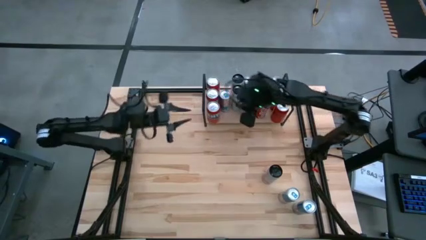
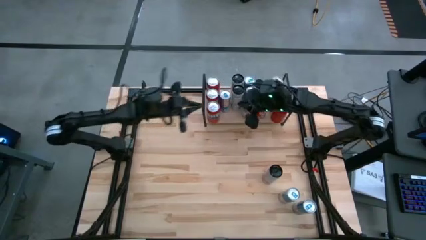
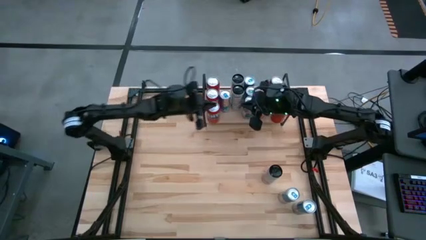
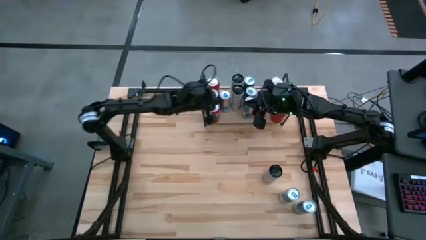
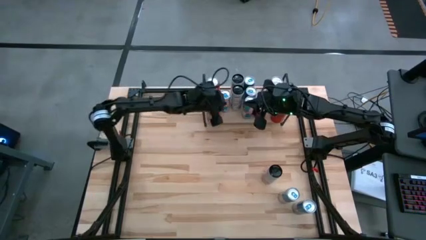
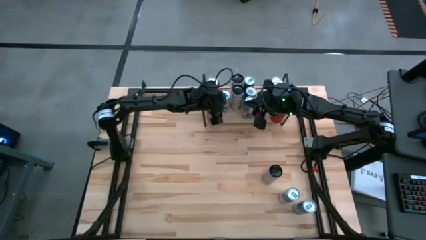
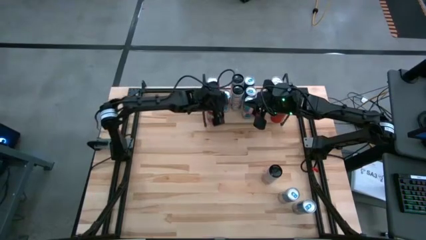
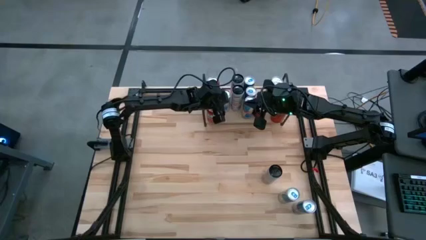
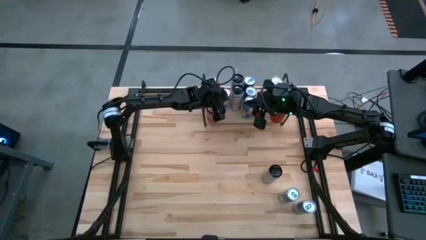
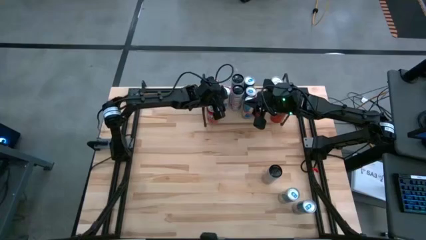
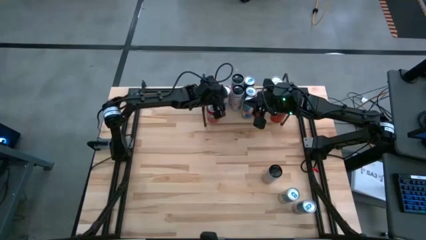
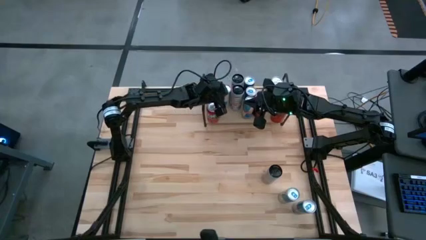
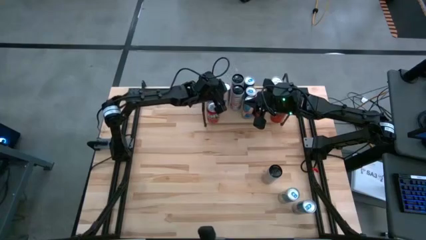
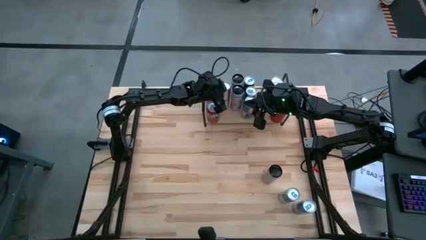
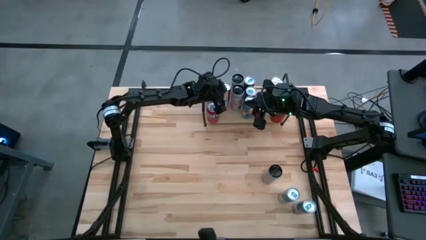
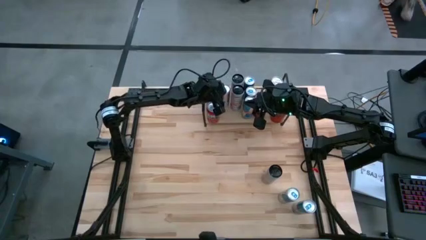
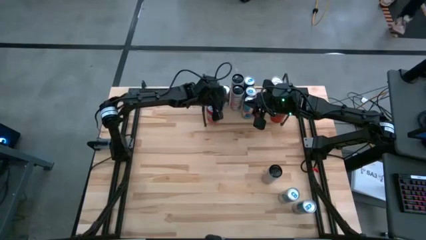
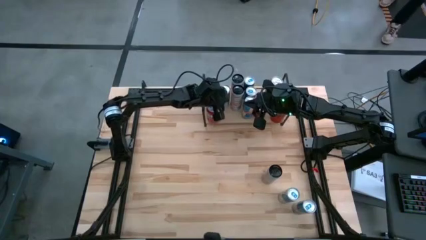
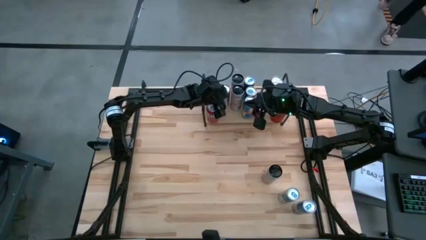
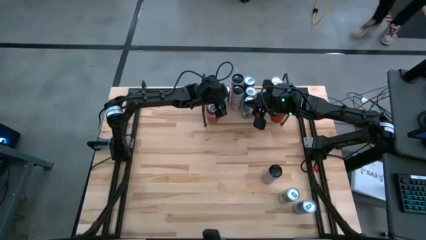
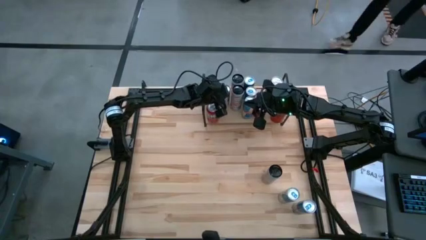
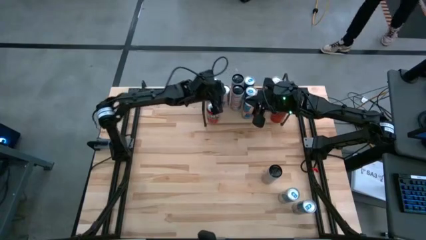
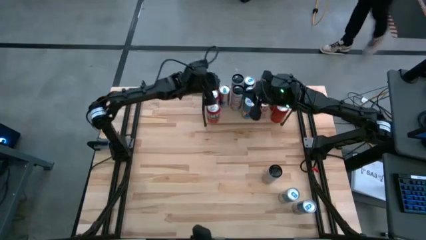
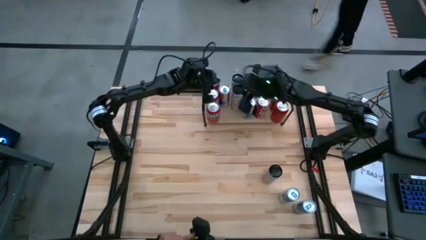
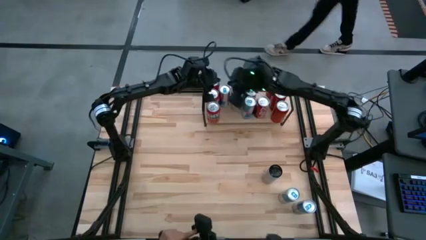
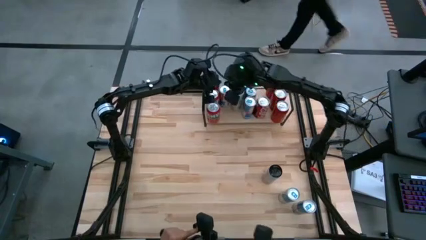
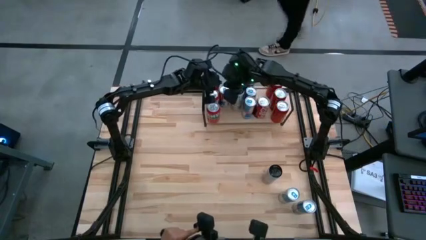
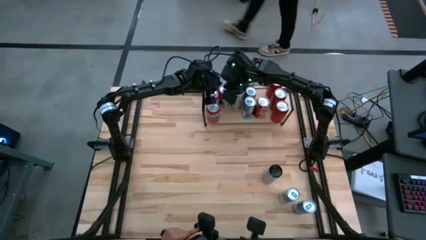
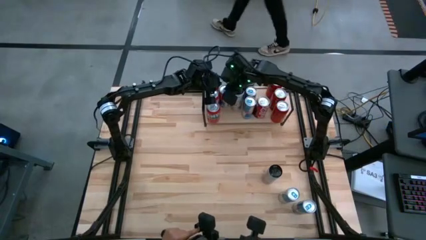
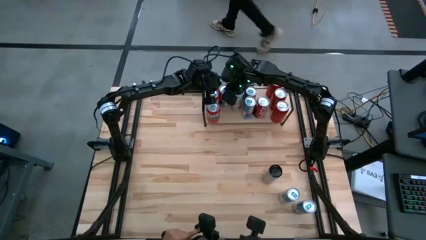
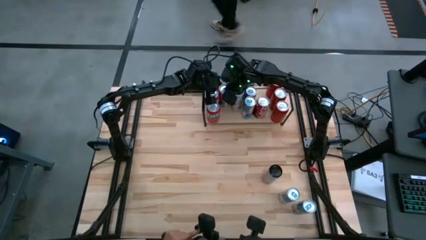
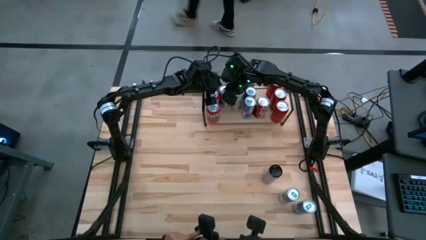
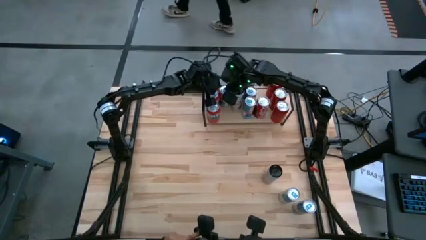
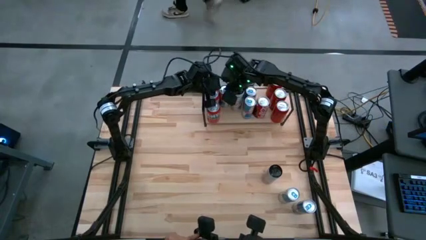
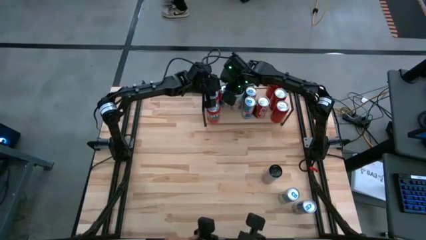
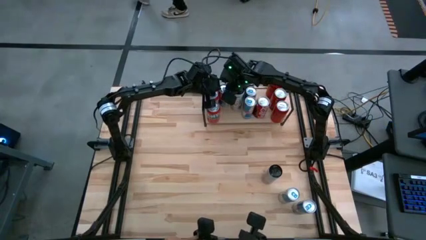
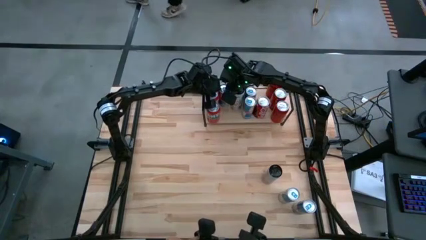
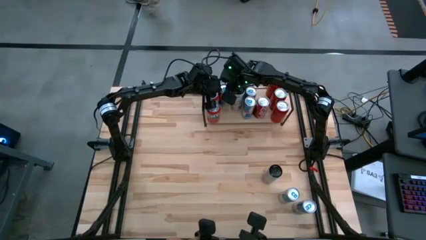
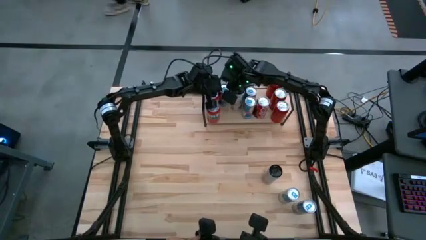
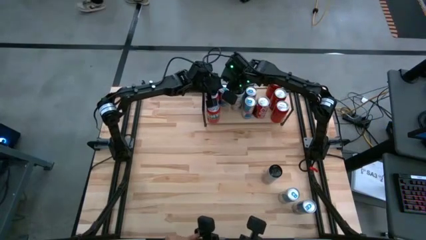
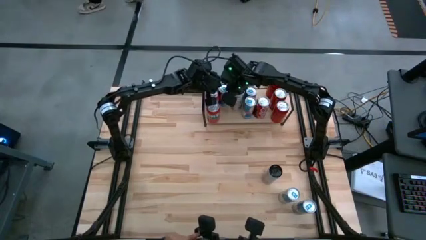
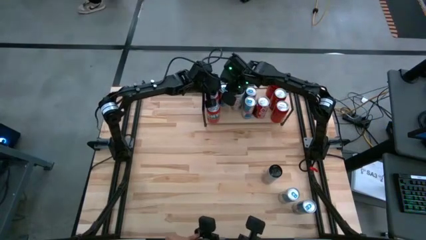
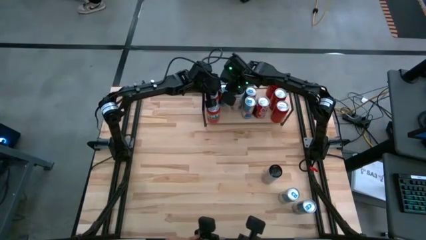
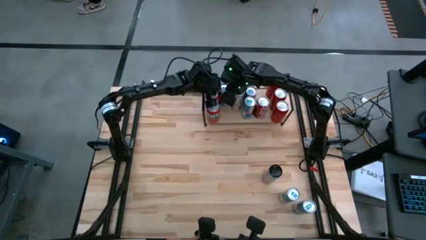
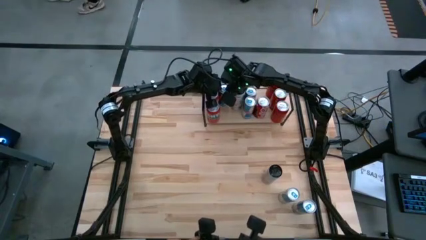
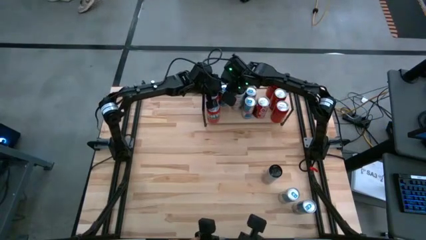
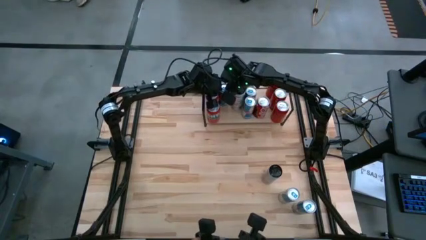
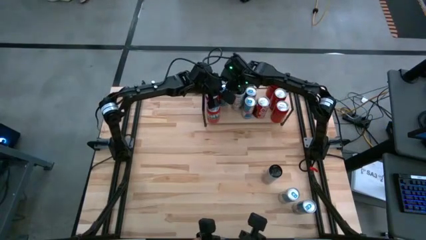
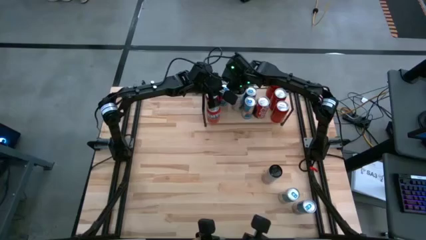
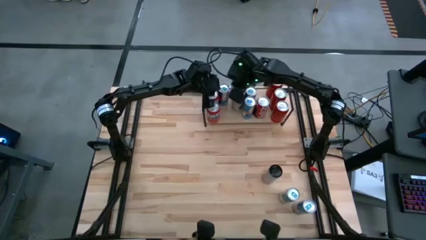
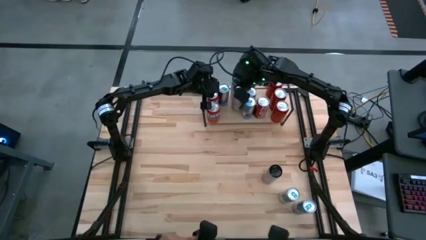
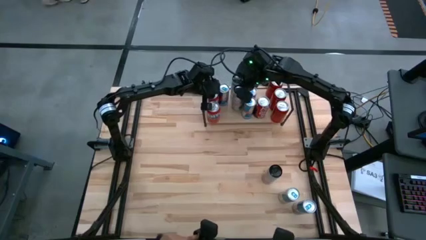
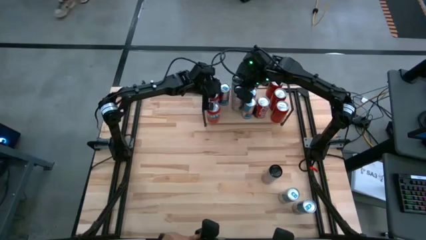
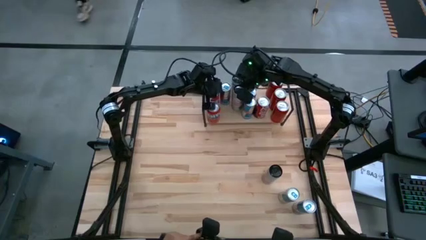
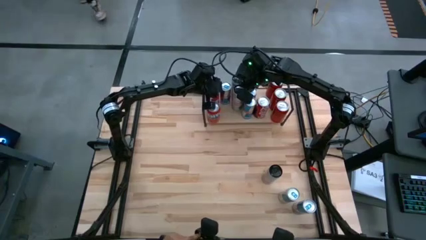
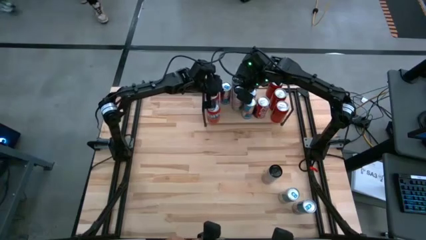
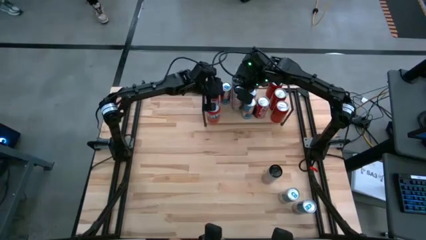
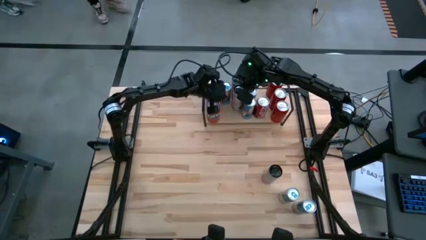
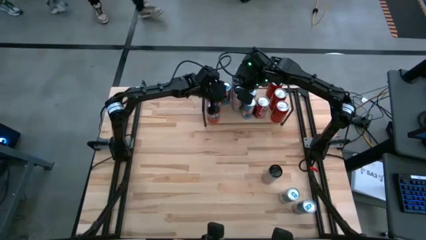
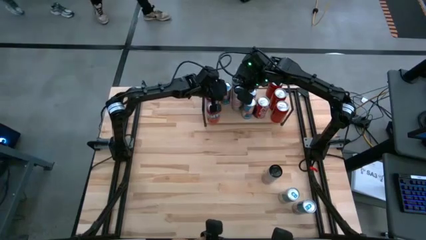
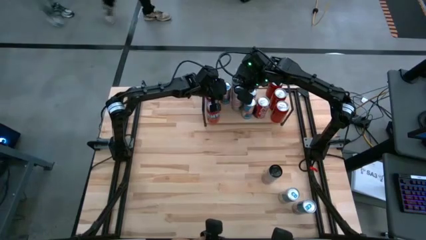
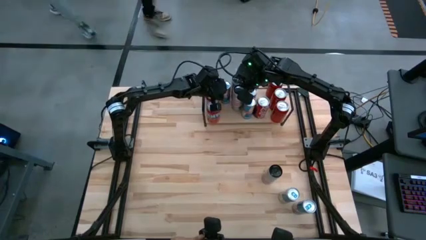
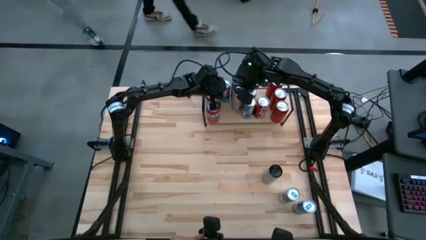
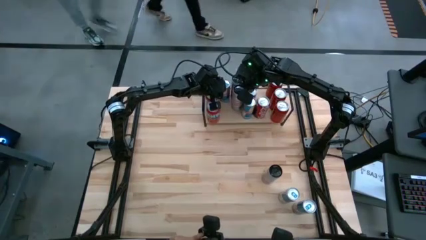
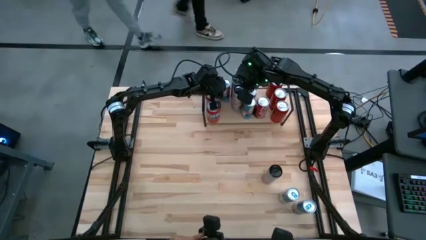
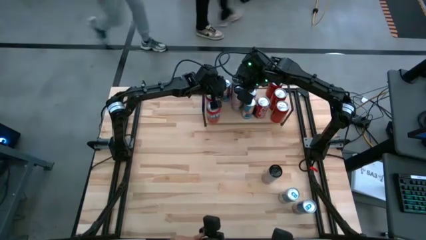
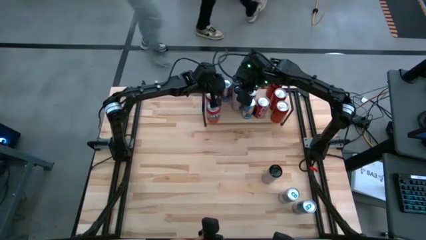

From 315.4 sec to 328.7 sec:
Task: Place canned beverage on shelf
Put the blue soda can on the shelf
